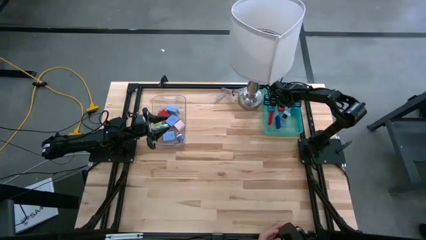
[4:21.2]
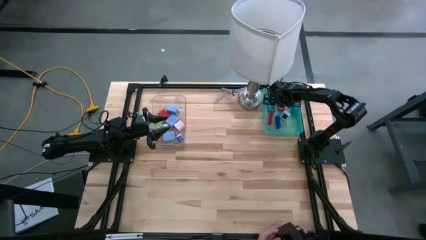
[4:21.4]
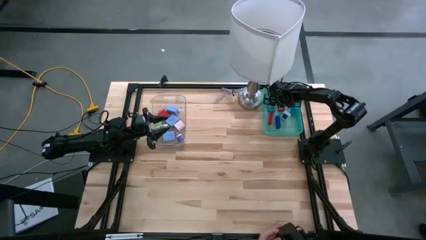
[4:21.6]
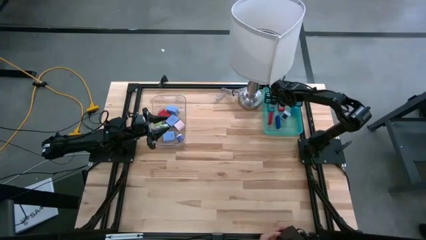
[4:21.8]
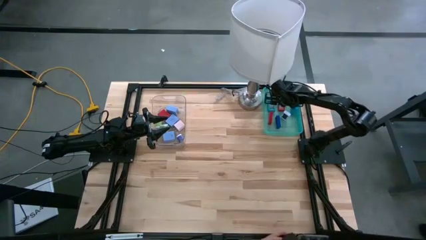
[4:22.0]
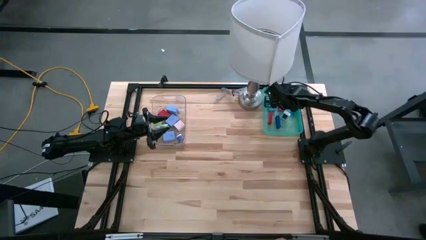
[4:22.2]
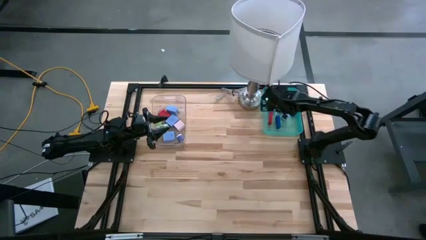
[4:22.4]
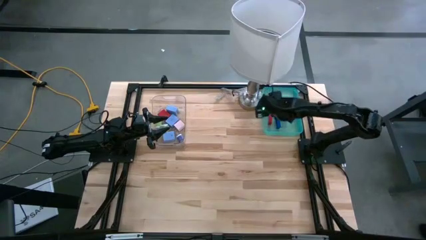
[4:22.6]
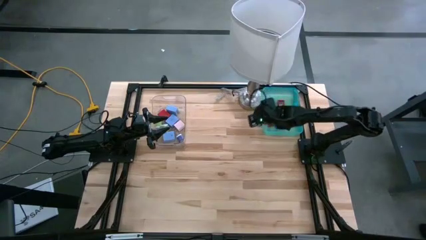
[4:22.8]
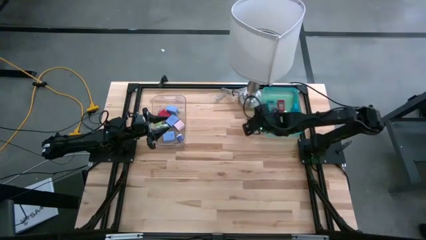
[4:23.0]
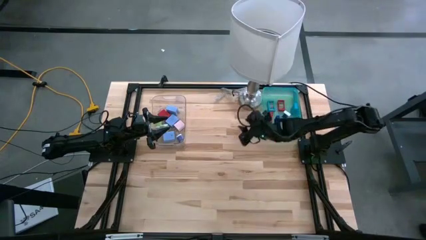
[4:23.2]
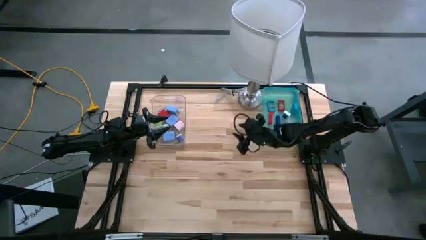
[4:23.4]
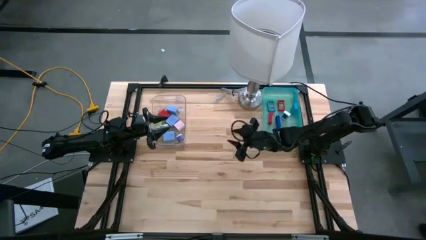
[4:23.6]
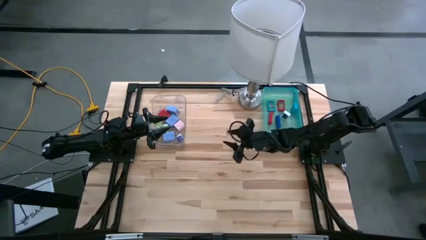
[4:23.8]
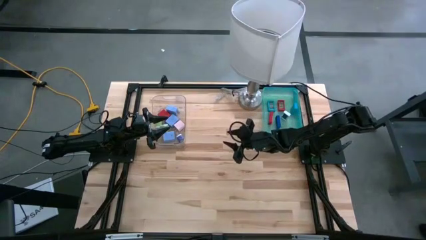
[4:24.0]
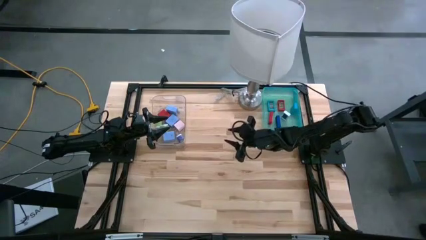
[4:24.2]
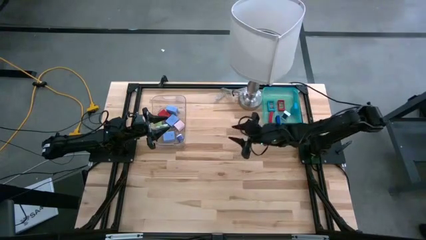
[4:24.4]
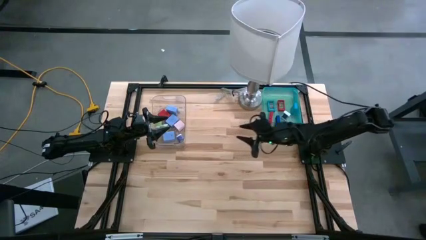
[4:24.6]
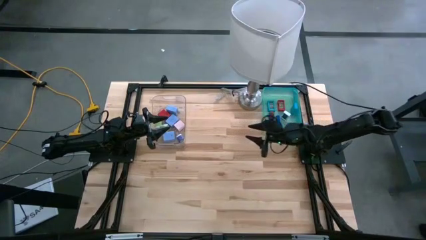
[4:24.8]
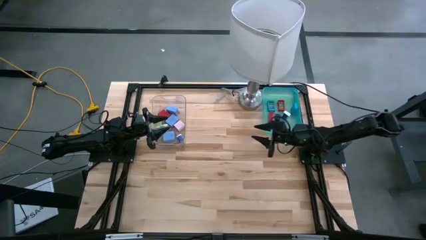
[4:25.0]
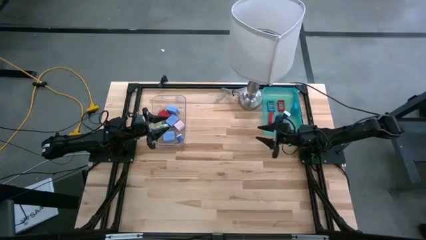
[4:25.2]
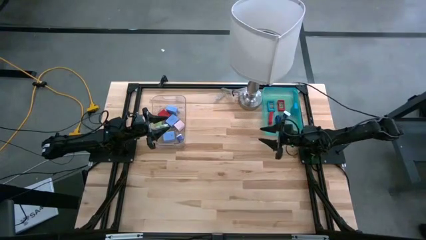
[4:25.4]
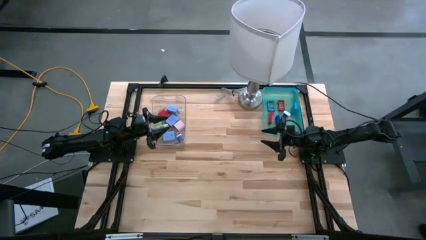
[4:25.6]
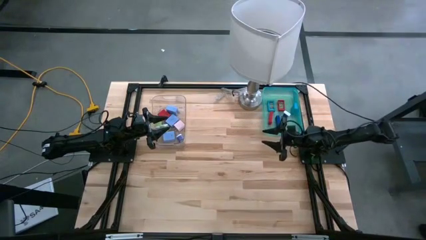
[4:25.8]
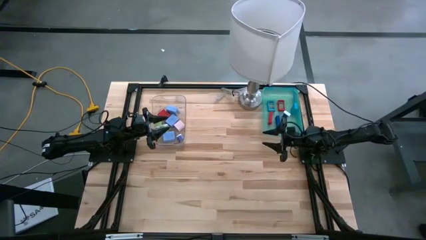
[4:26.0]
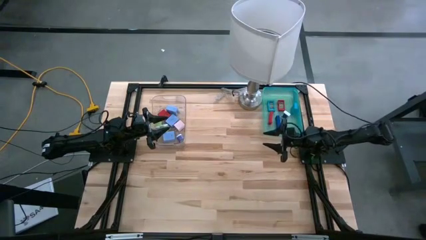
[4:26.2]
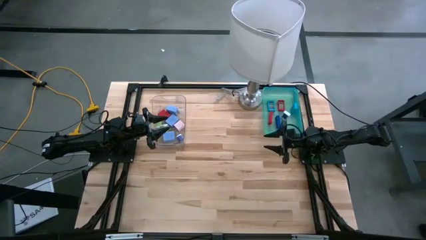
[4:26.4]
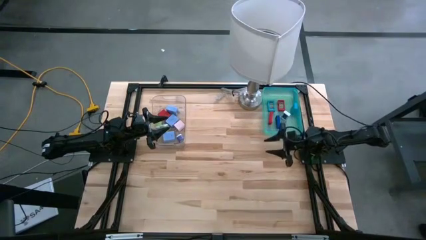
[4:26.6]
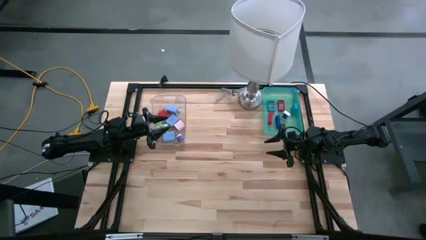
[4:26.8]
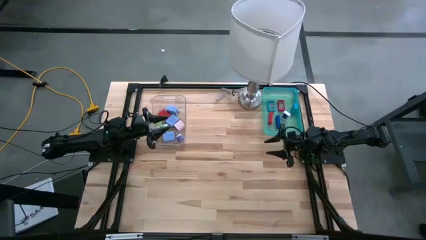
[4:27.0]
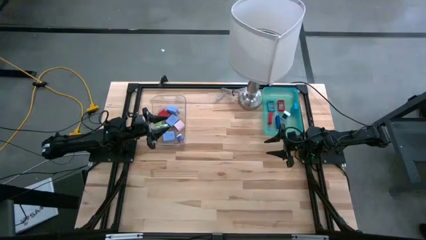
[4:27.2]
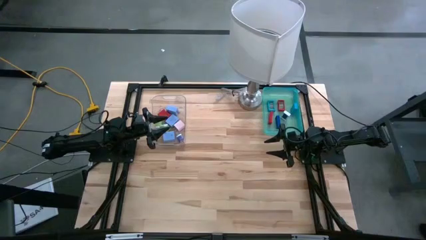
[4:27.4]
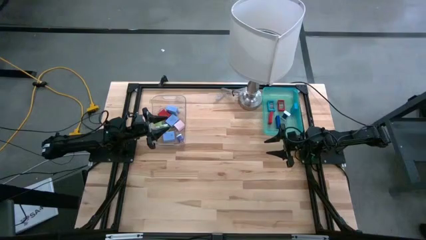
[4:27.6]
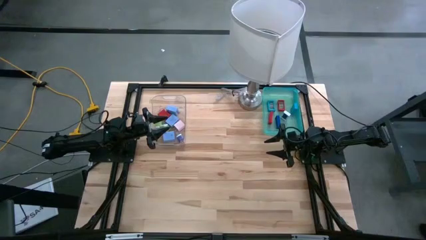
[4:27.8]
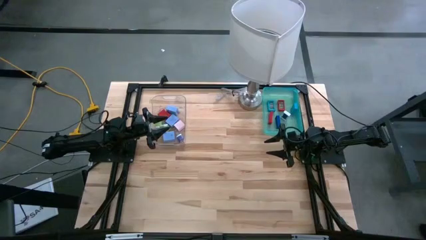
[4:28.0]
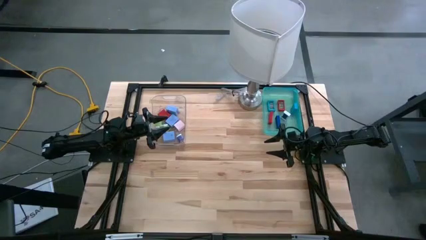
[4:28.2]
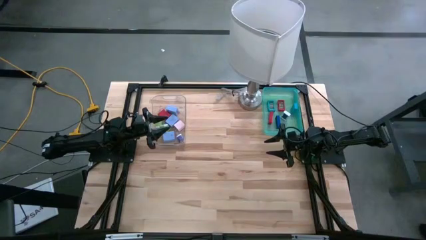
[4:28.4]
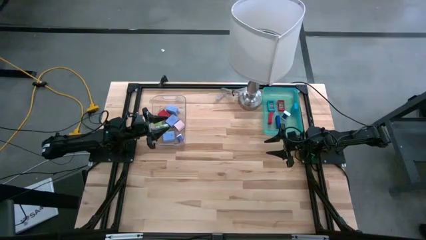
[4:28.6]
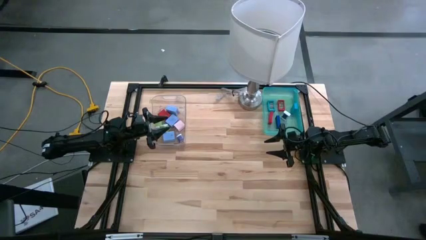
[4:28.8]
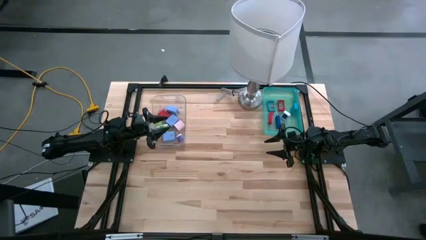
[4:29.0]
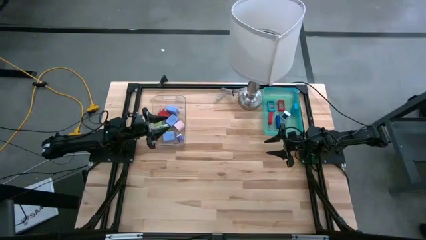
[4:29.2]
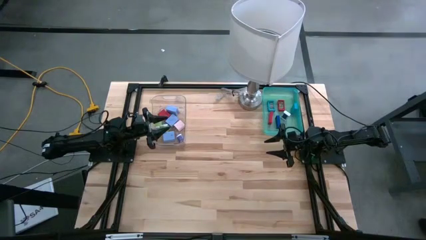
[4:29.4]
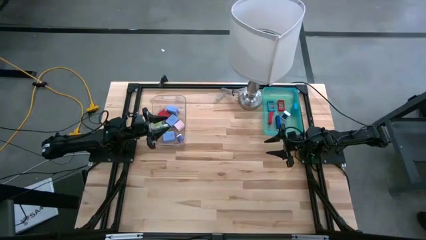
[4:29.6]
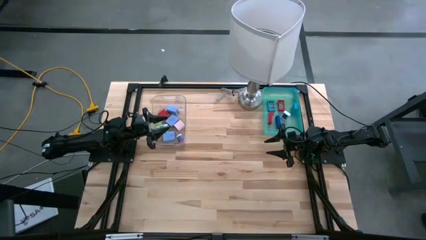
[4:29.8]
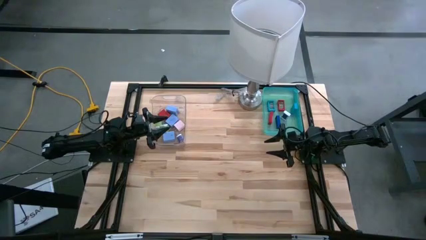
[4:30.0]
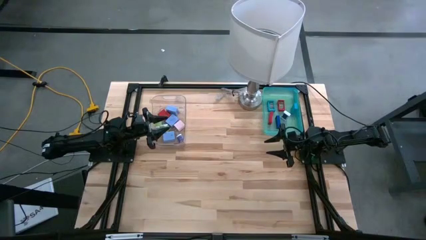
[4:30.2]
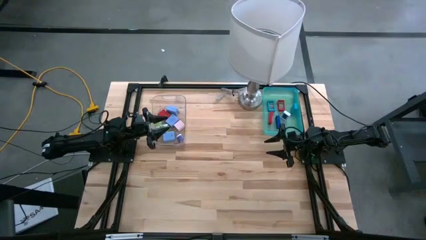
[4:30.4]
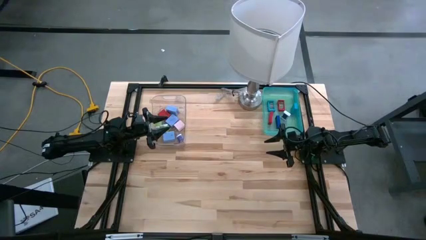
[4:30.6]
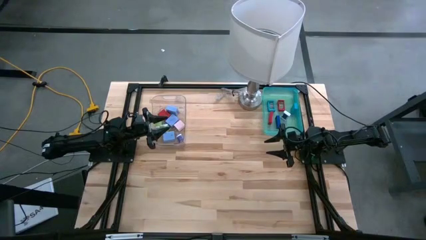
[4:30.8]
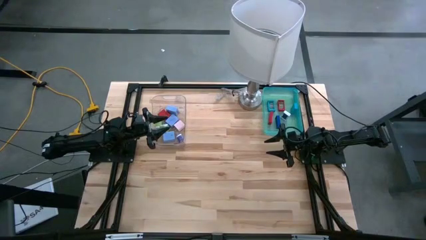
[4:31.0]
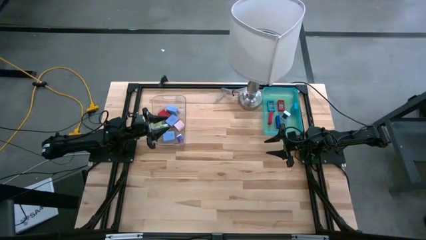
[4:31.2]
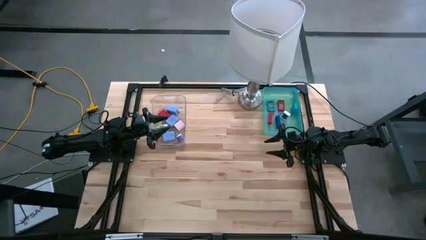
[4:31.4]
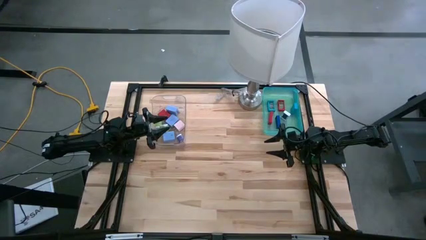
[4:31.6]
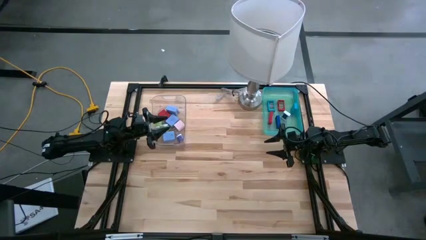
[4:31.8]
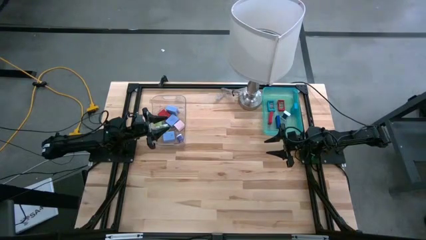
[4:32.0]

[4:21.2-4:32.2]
Task: Pick & Place Office items
Return to Home Position

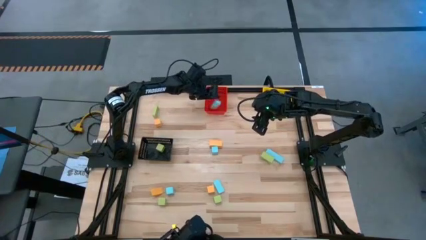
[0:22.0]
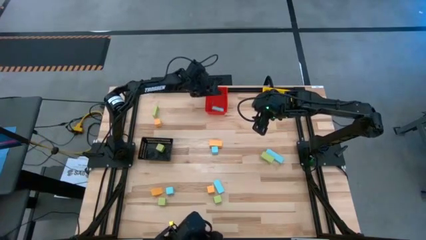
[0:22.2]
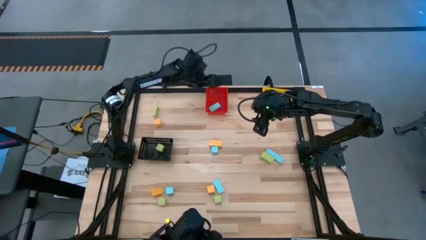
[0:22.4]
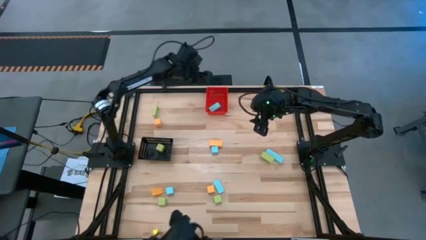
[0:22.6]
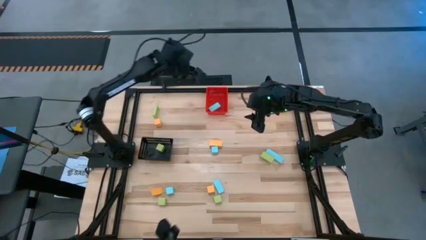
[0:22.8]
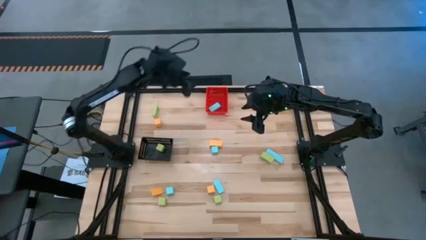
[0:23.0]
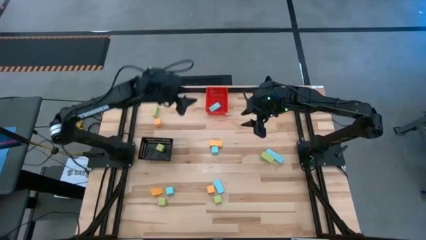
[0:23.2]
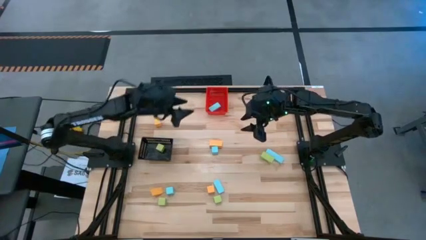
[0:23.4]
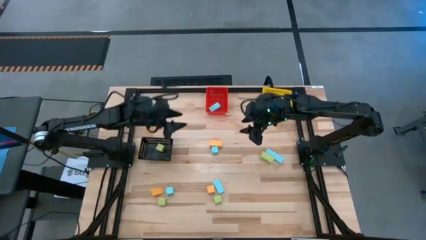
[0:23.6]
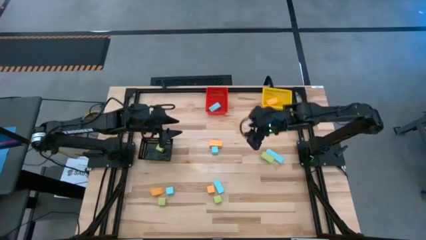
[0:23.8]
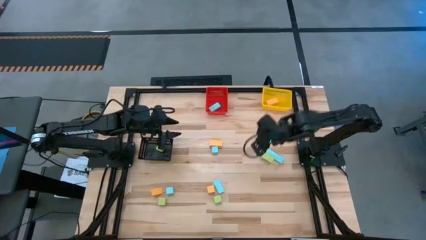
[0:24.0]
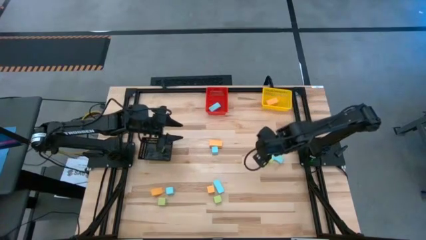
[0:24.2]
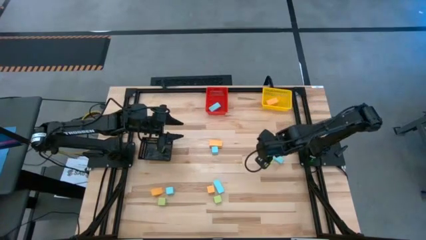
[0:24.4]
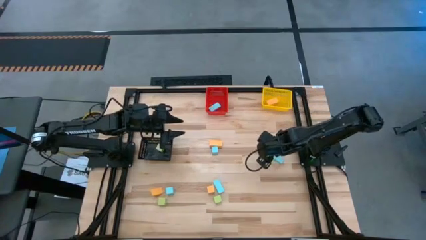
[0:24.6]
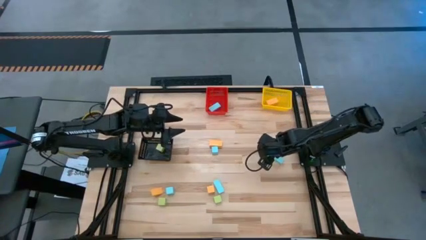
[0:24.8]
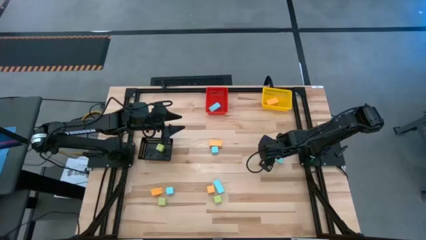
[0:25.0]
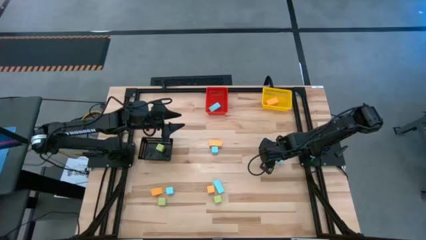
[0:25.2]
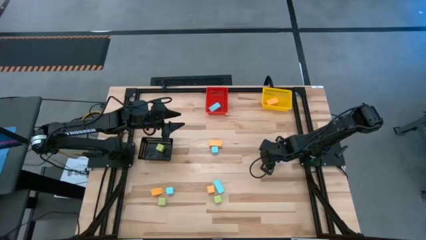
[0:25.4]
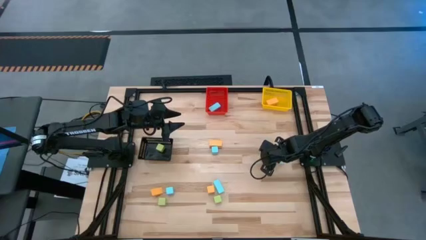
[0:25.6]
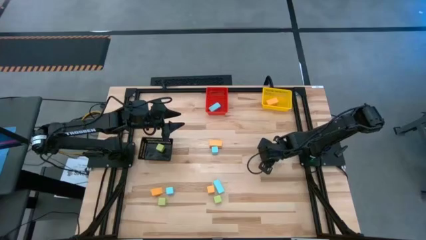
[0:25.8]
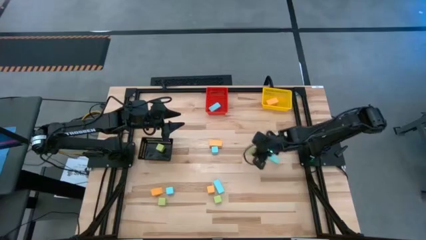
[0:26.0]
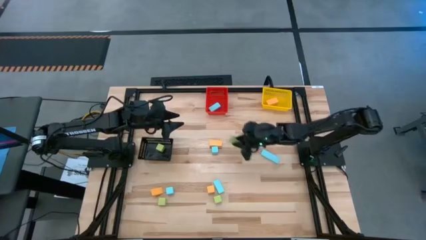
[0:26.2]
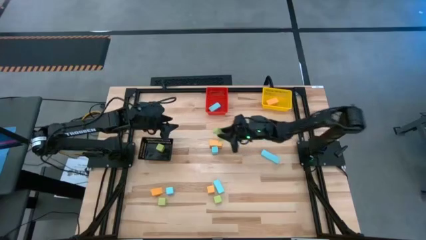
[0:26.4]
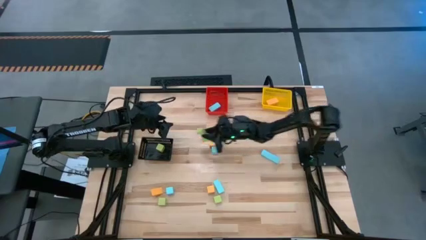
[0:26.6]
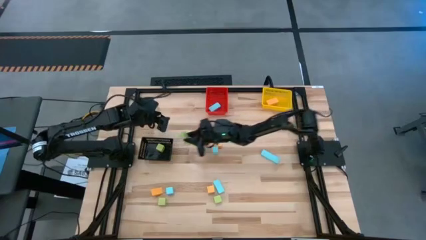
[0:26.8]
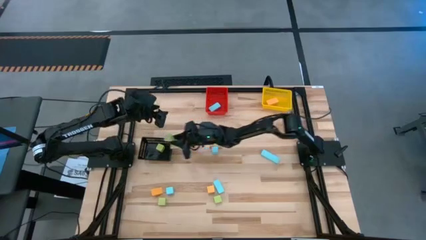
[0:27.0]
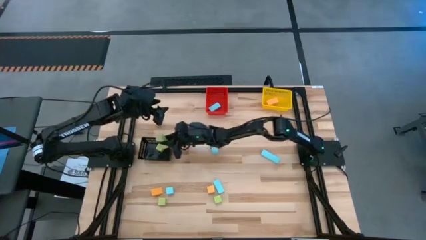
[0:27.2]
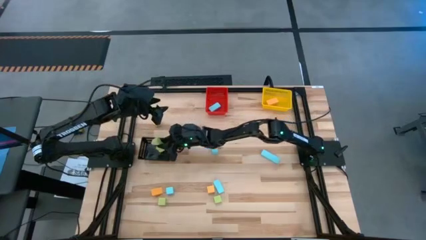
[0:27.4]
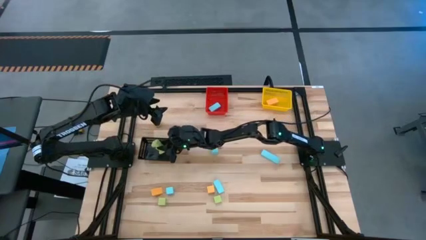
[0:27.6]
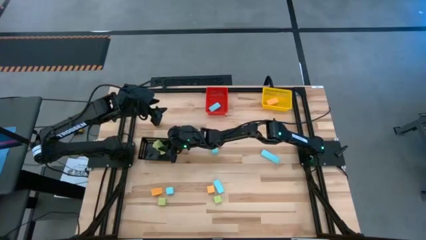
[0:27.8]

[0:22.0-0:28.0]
Task: Sort & place blocks by color
Put the green block into the black bin
